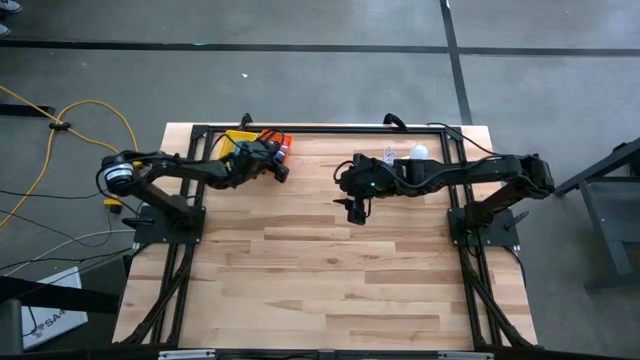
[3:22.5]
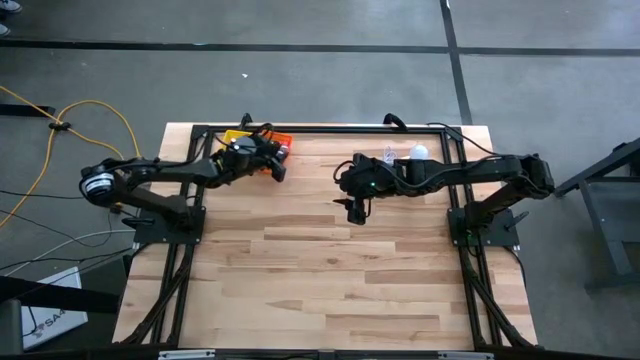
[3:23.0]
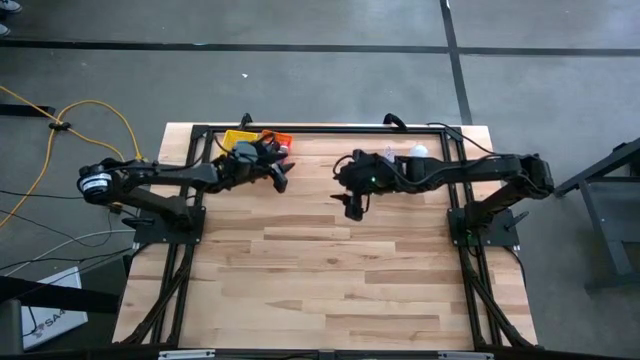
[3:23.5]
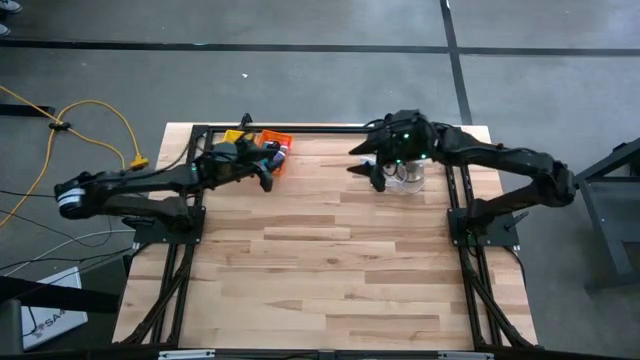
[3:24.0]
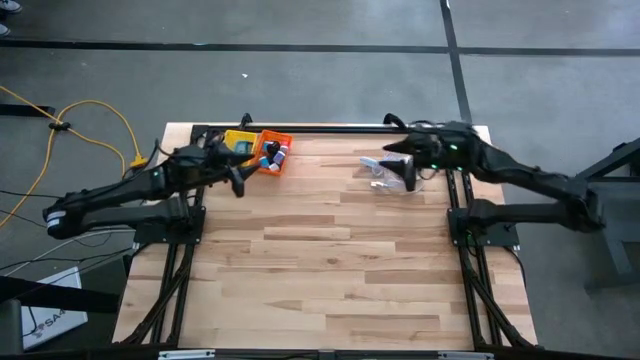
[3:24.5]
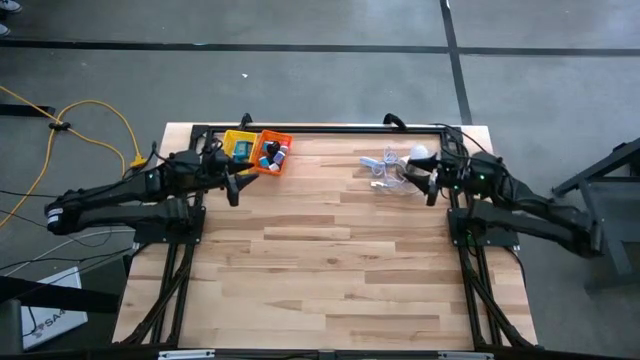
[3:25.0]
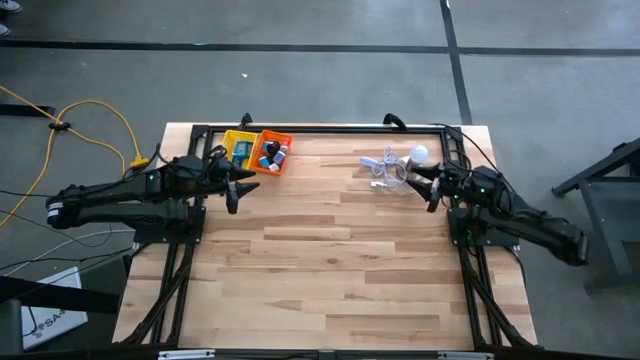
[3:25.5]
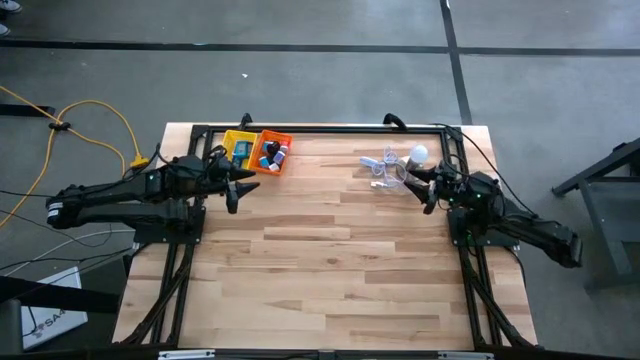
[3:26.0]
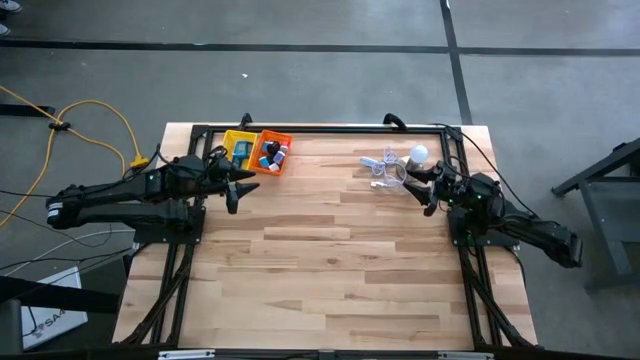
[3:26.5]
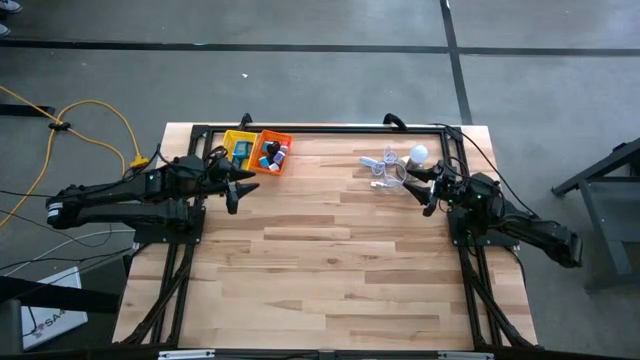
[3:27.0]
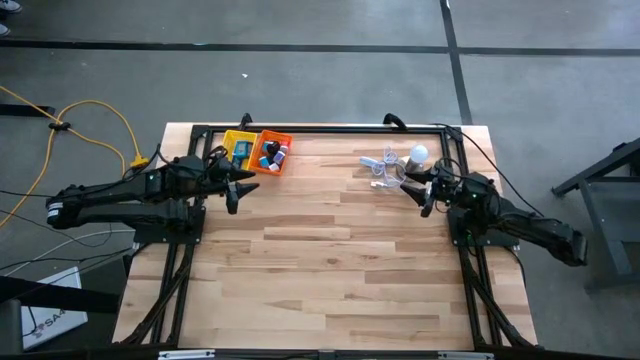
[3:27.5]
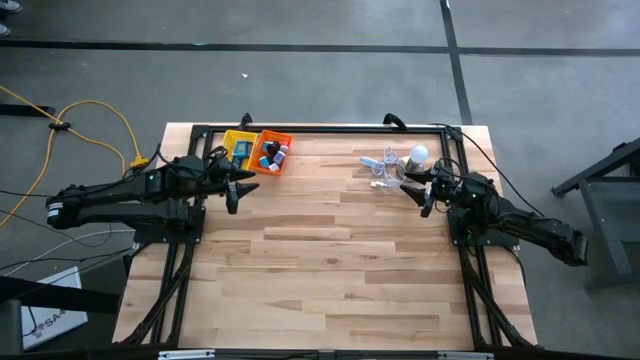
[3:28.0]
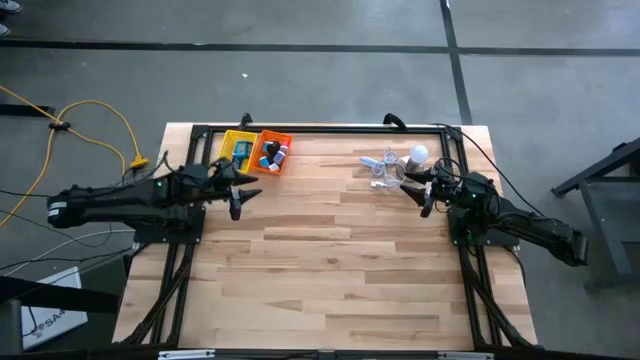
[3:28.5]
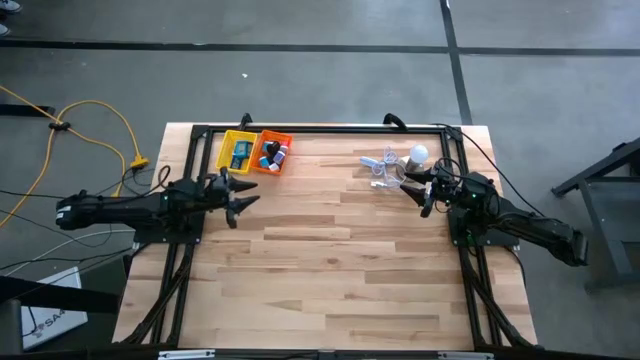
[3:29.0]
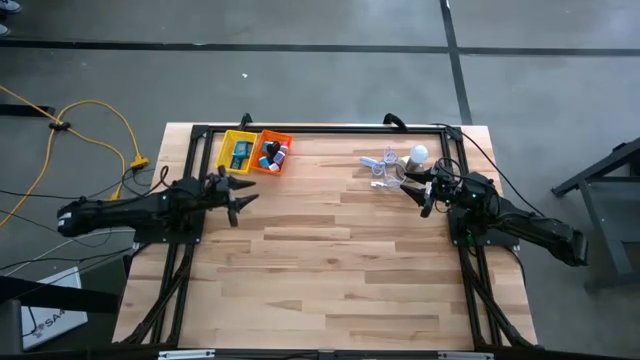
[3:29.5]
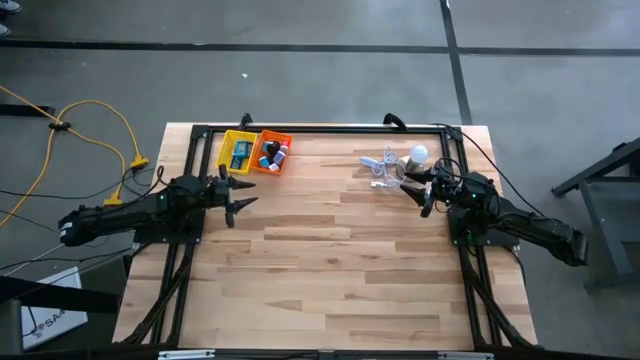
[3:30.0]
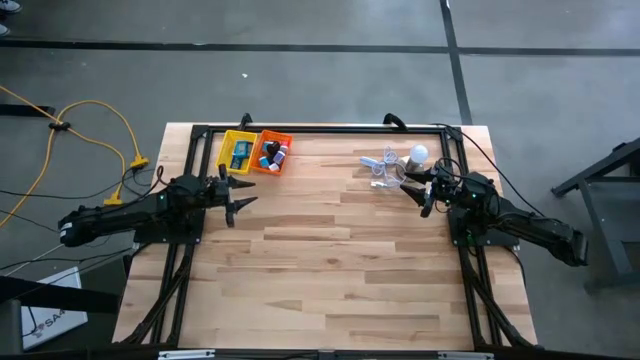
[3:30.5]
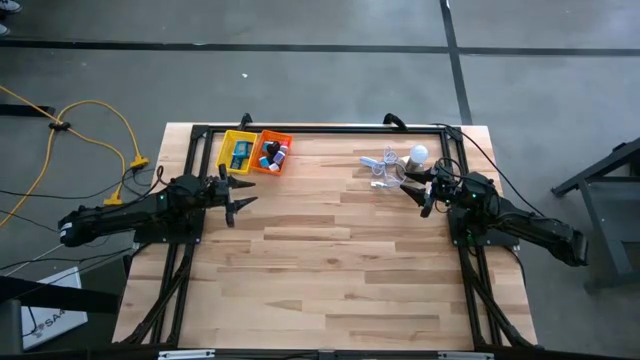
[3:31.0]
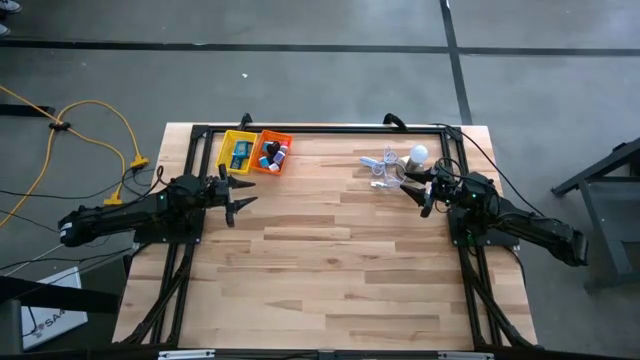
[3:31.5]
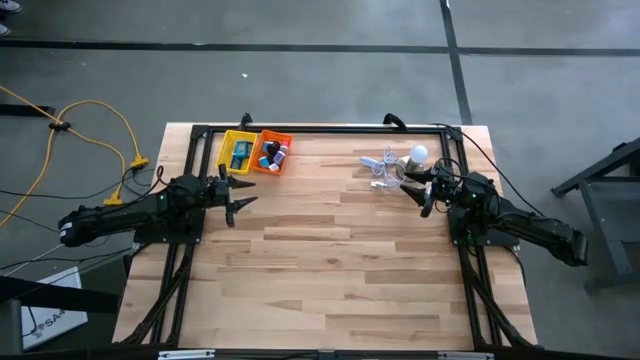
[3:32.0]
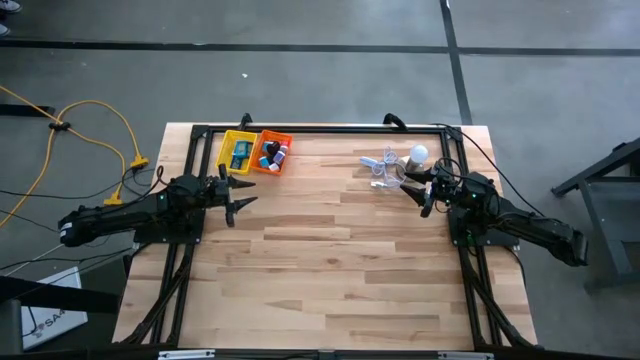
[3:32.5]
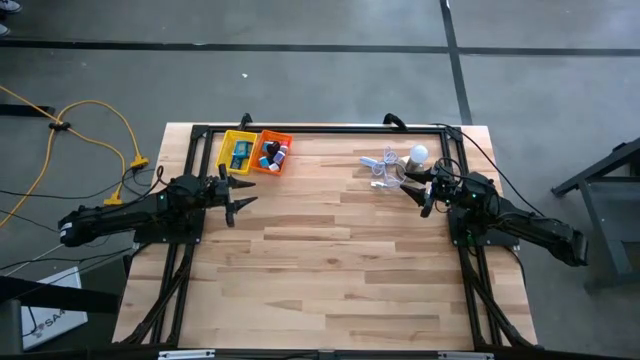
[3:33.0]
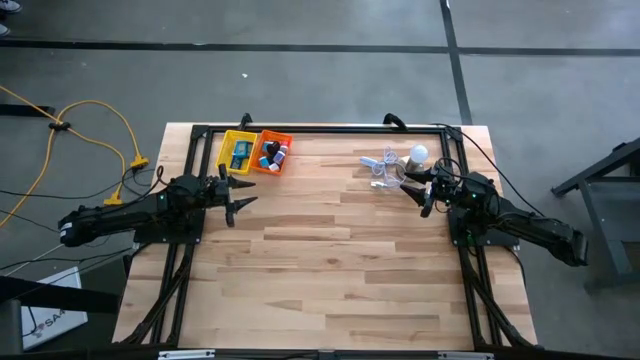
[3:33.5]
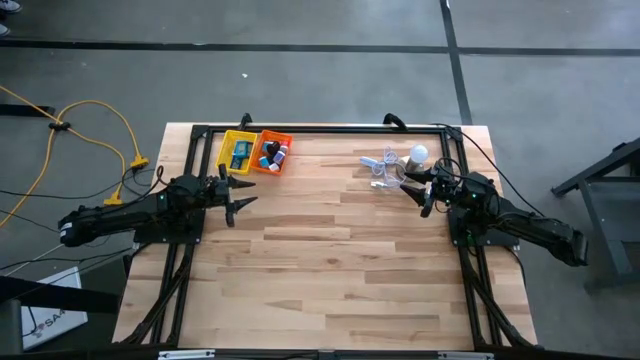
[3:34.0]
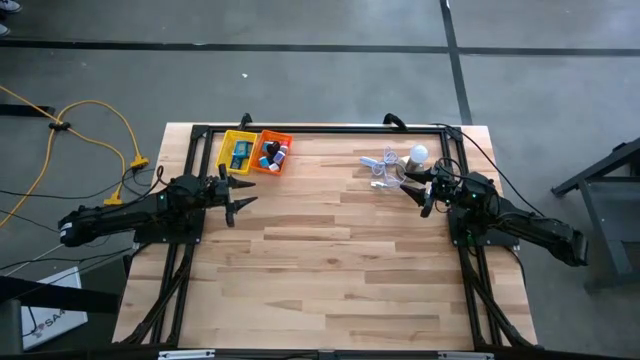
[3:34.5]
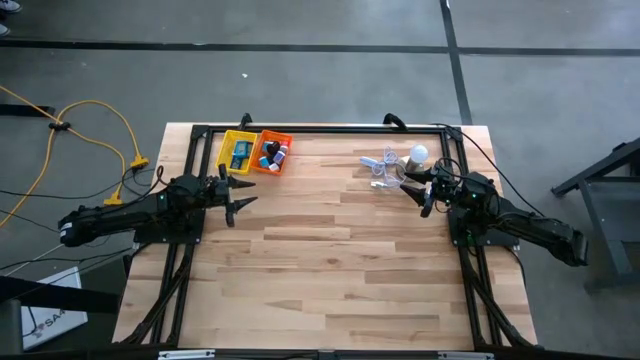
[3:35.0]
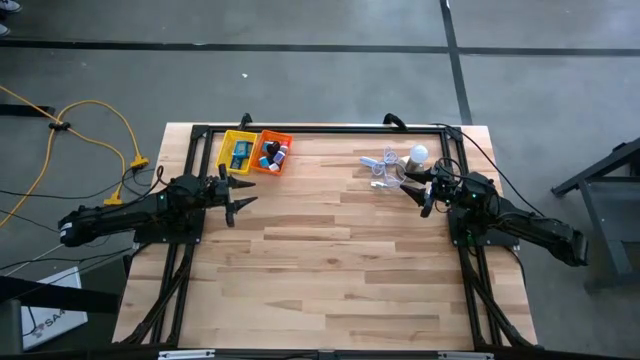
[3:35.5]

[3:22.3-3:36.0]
Task: Pick & Place Office items
Return to Home Position

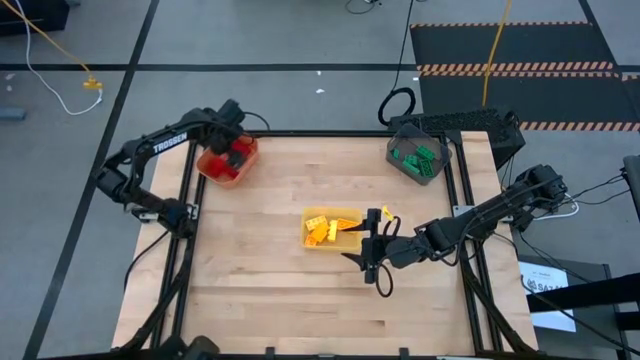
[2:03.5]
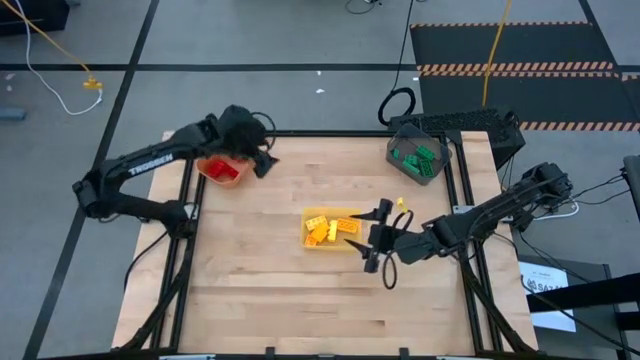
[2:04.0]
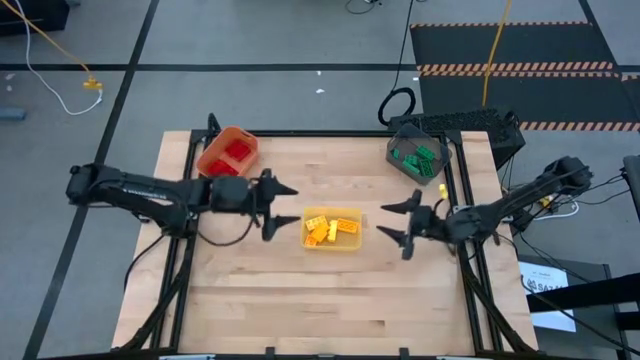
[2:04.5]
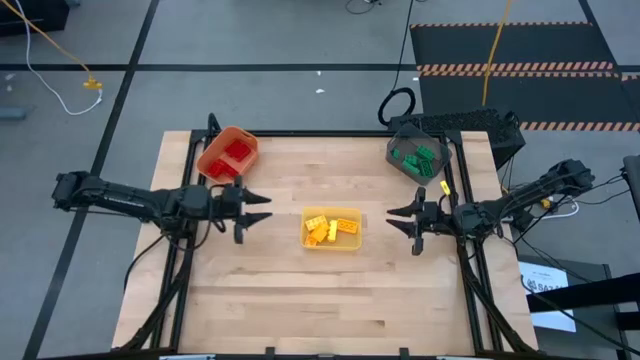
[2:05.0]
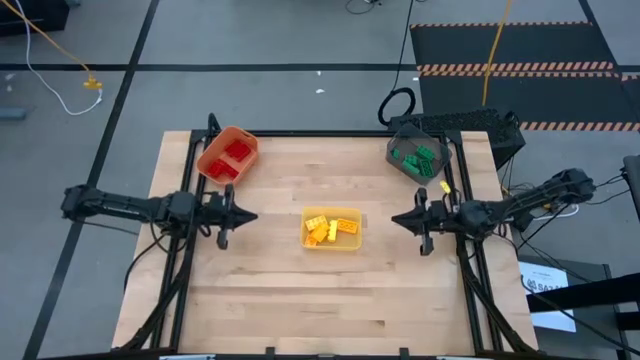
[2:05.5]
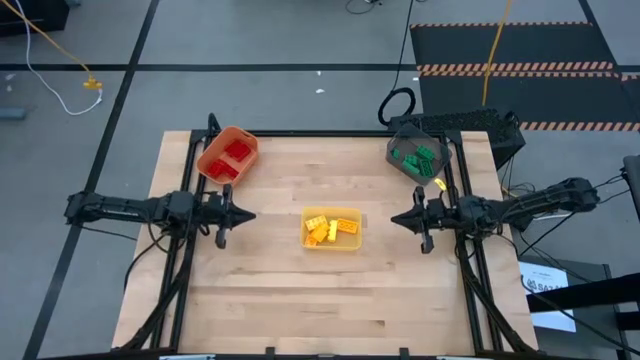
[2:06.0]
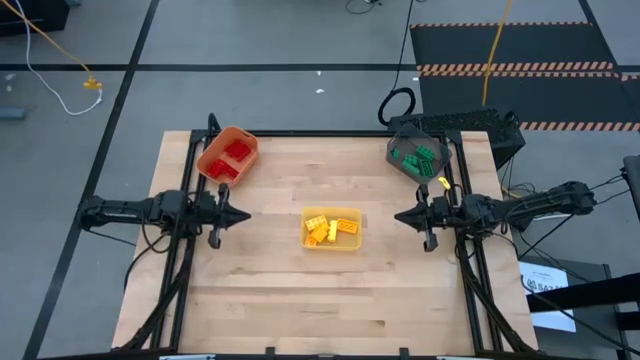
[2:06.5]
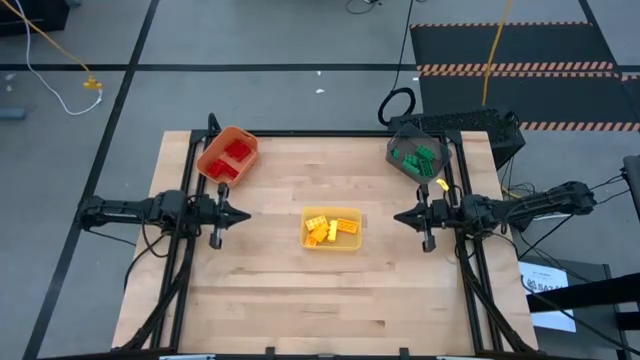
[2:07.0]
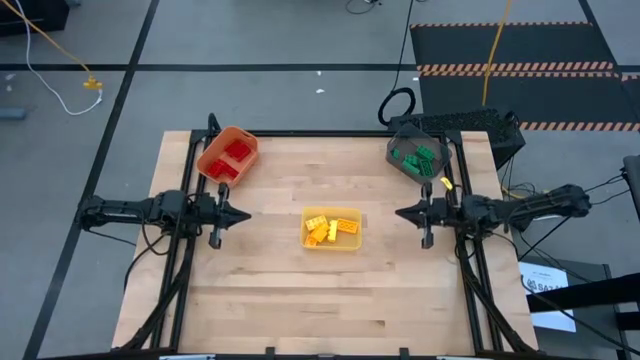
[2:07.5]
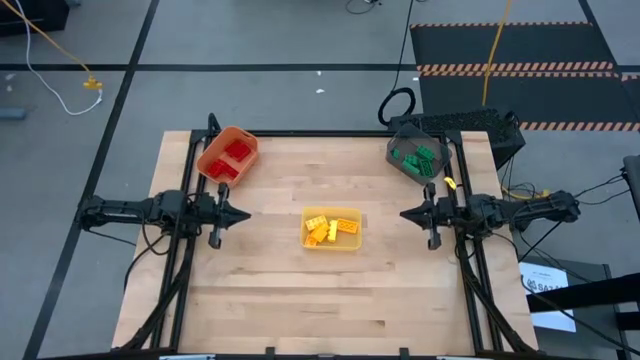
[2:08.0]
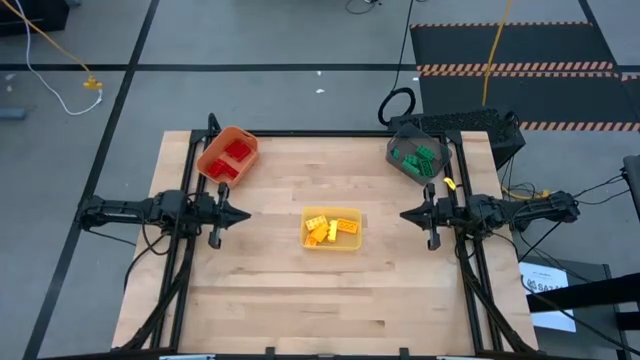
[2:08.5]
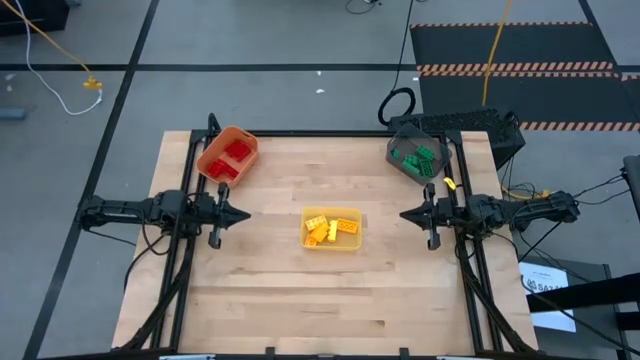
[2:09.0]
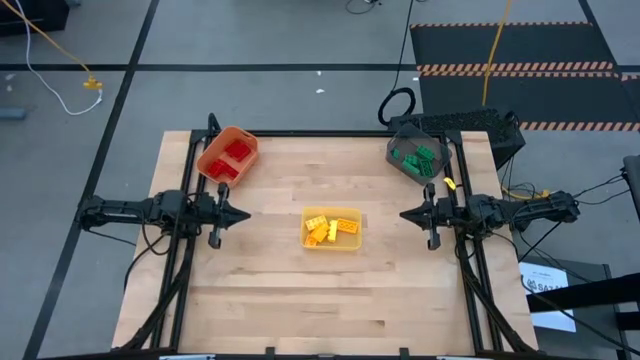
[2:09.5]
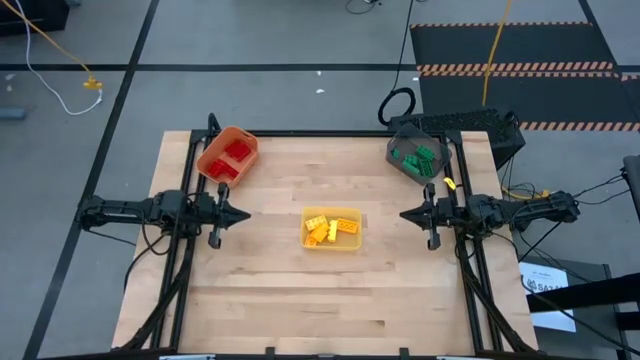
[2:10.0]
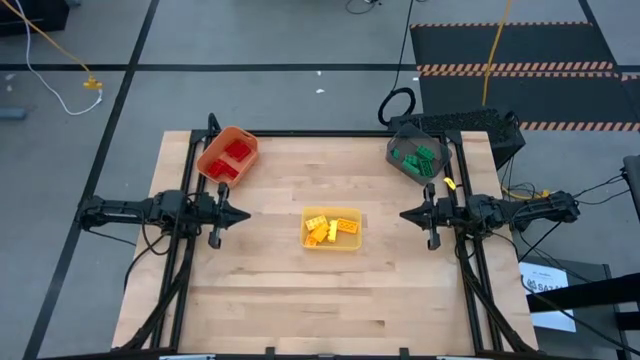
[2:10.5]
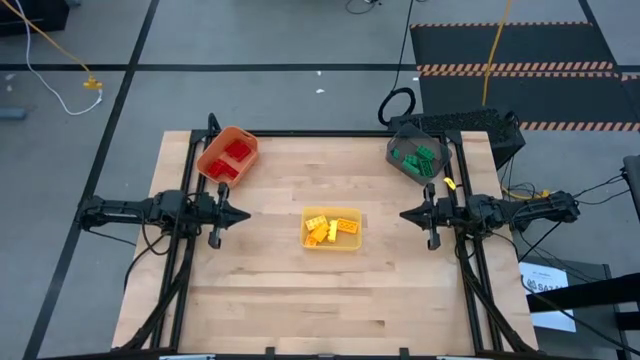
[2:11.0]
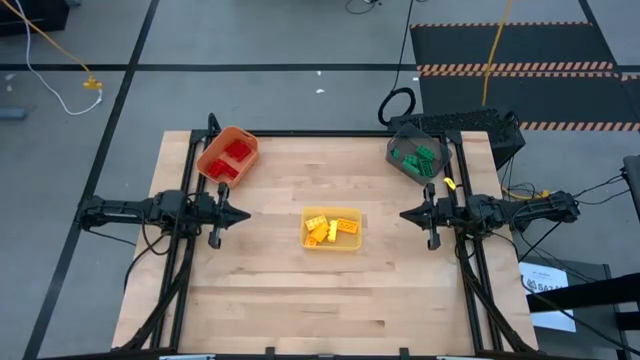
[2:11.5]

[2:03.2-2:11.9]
Task: Sort & place blocks by color
Return to Home Position
